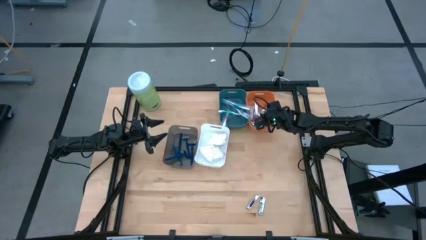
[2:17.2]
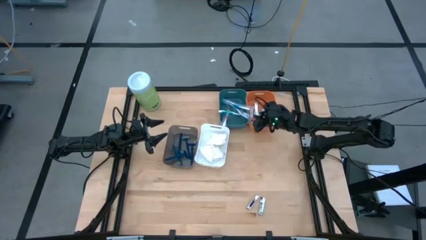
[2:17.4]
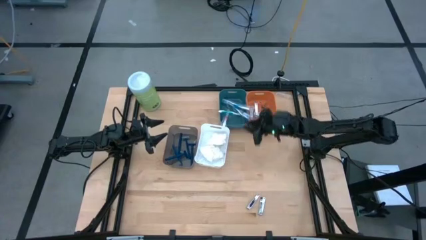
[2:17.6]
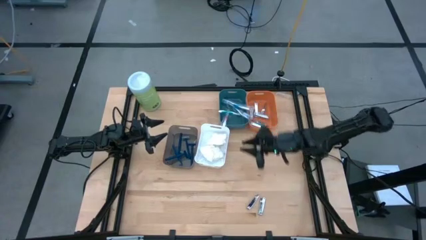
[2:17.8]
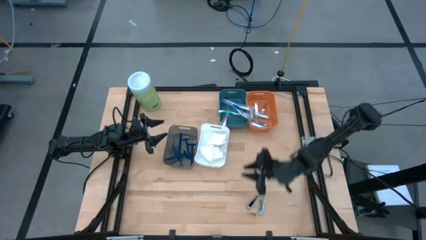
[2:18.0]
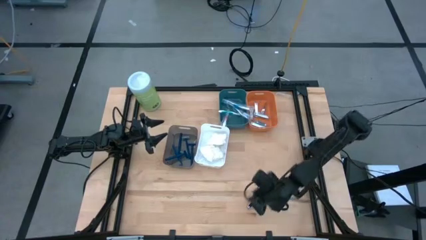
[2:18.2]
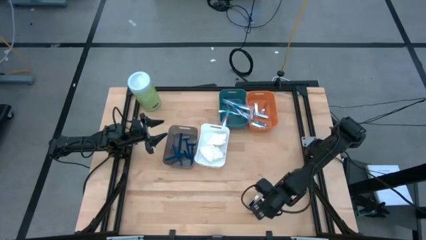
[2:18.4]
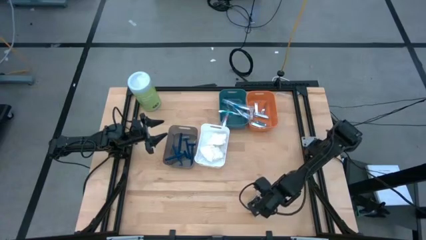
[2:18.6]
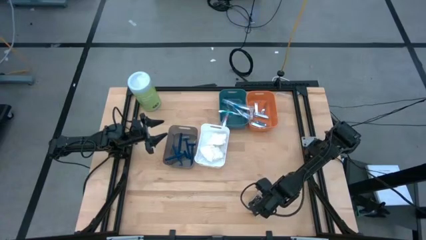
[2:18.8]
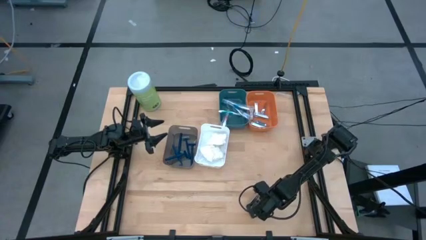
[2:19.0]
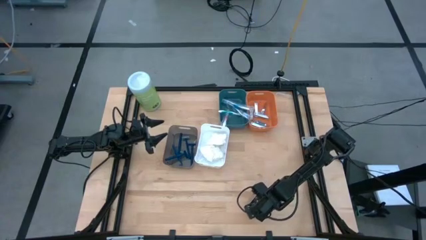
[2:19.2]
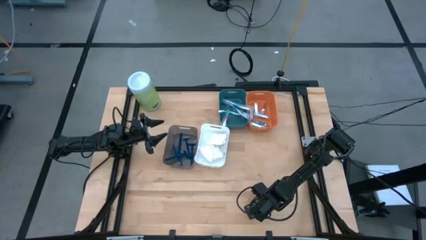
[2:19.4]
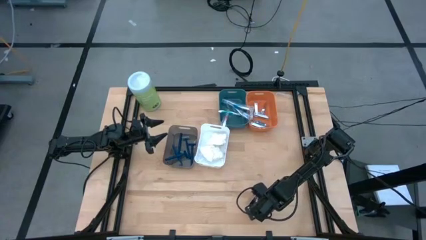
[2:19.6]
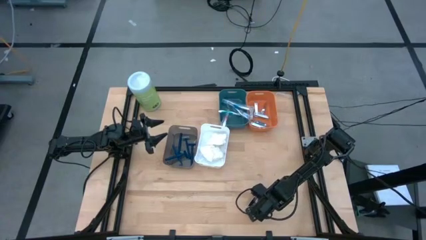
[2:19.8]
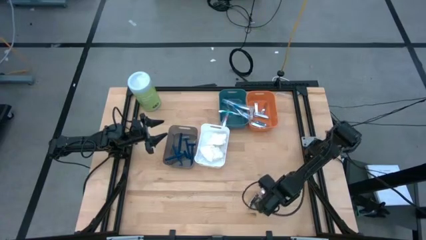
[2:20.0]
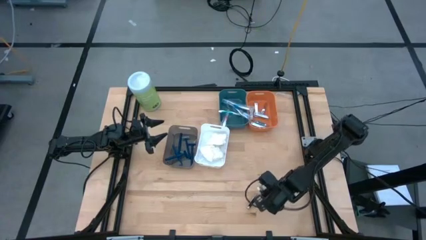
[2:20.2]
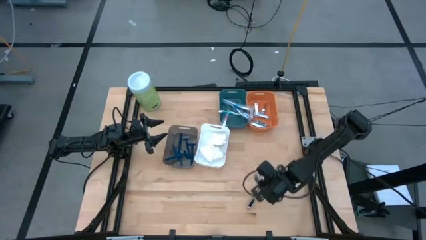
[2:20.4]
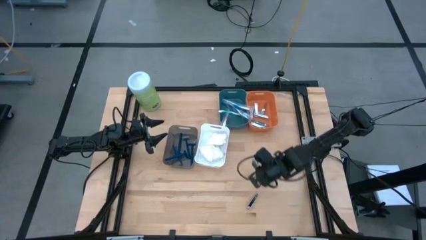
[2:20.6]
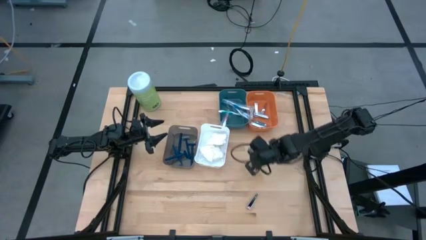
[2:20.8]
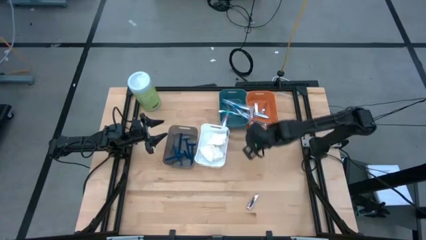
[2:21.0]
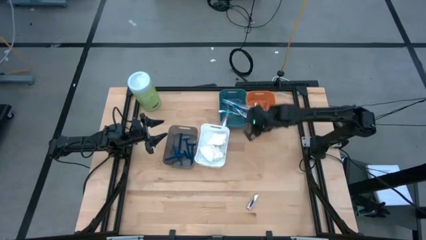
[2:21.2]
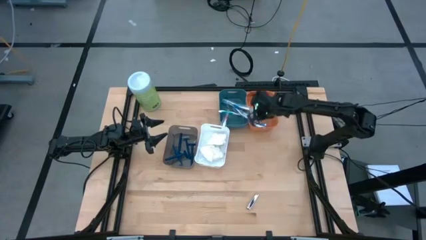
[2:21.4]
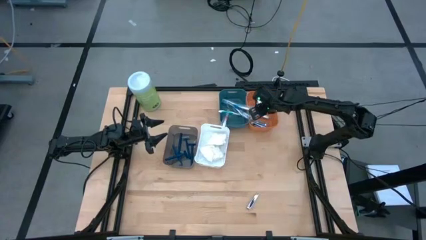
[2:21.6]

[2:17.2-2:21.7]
Task: Pick & Place Travel size toiletries
Put the silver nail cutter into the orange bin

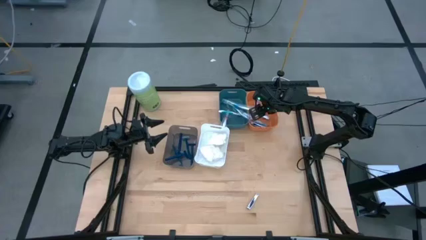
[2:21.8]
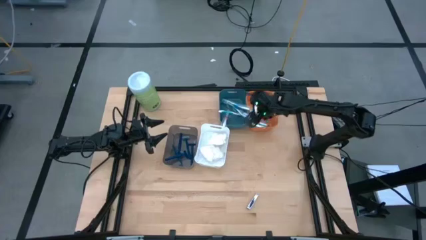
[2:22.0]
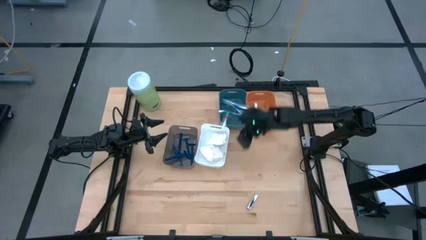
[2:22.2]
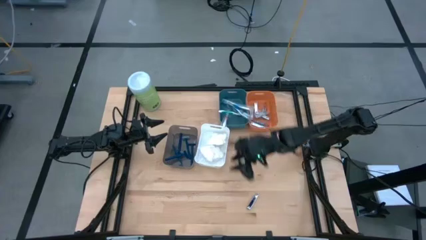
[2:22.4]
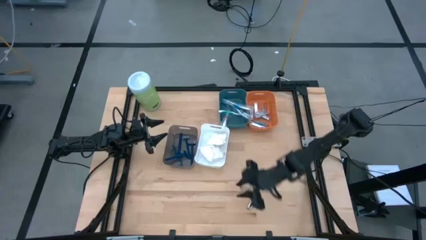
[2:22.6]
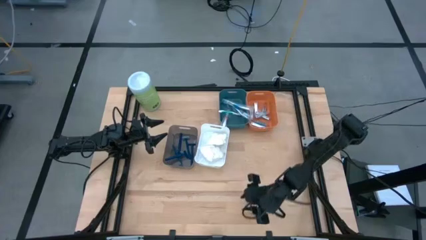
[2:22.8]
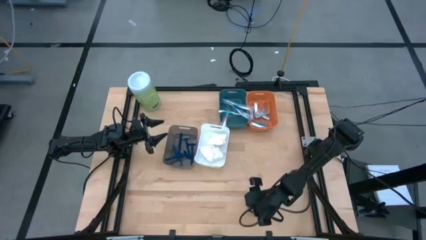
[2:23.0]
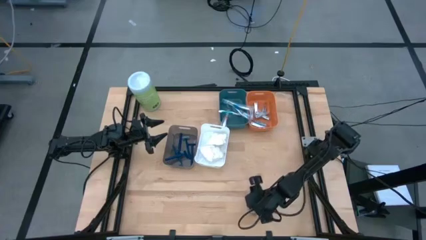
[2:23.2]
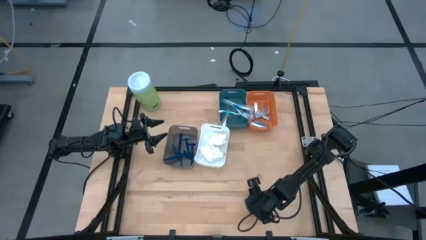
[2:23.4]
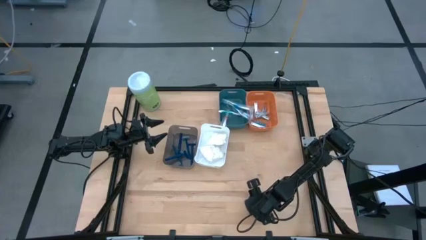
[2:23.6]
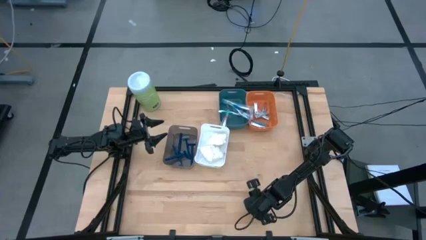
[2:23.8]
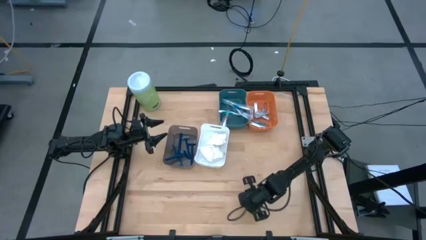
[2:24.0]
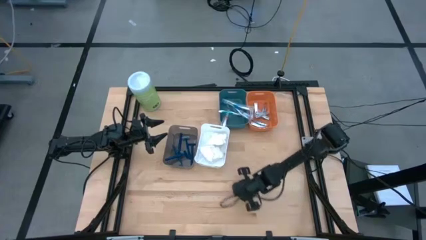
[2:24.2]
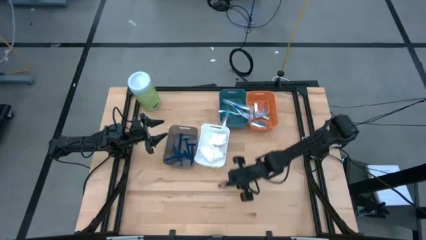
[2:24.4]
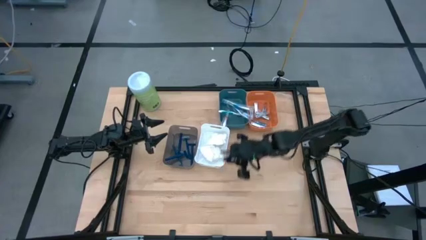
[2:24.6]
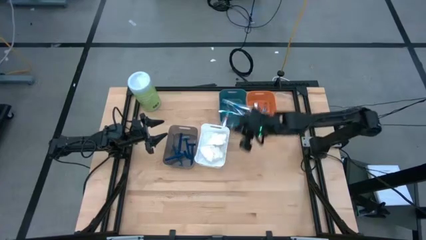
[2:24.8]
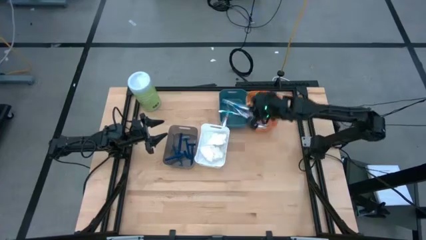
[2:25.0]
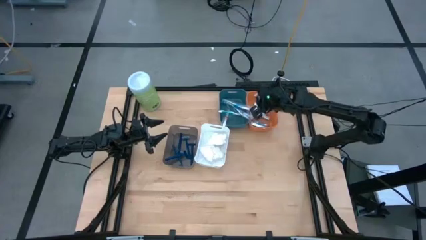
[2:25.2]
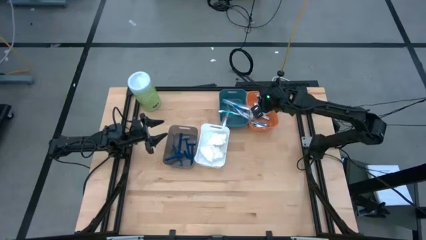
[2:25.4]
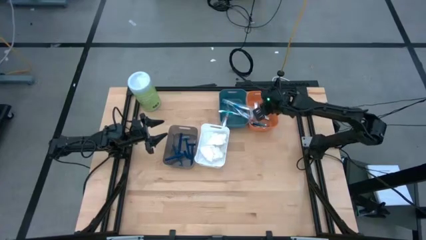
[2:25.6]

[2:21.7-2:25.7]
Put the silver nail cutter into the orange bin

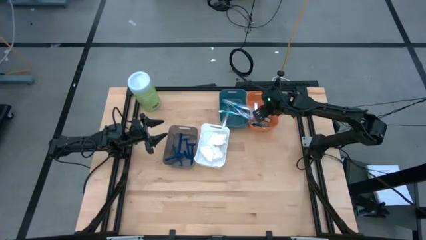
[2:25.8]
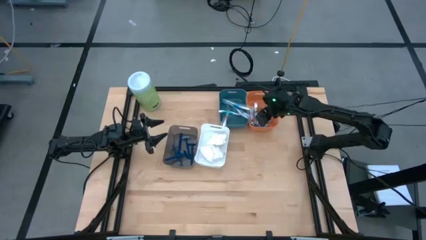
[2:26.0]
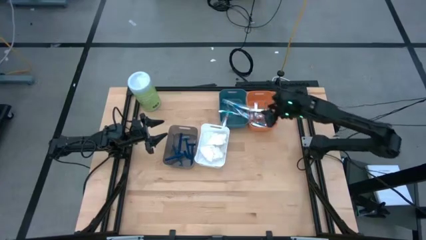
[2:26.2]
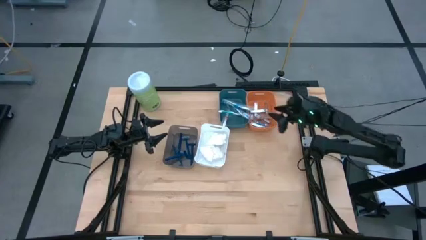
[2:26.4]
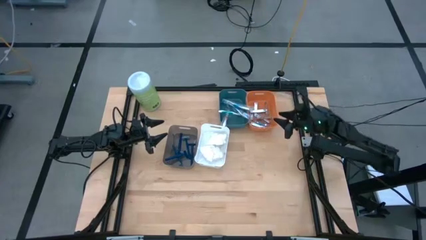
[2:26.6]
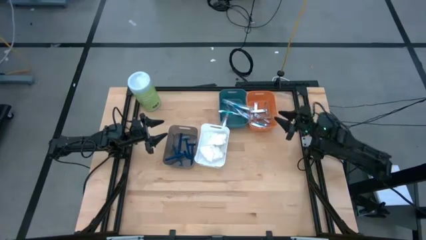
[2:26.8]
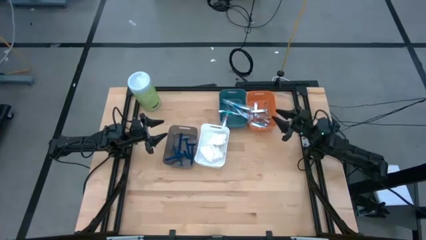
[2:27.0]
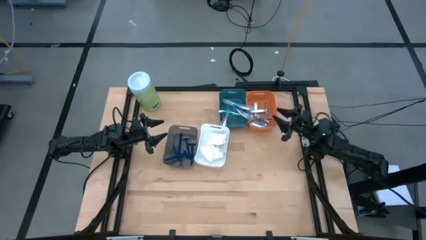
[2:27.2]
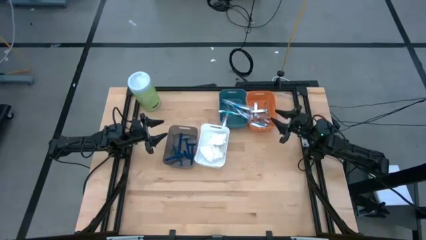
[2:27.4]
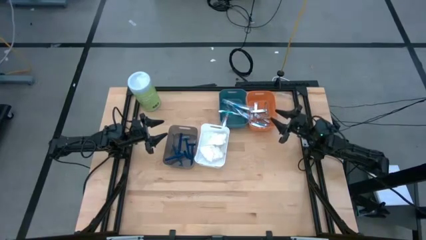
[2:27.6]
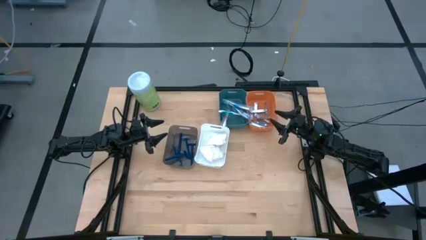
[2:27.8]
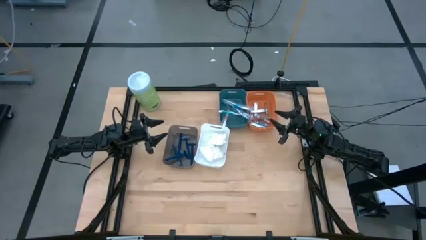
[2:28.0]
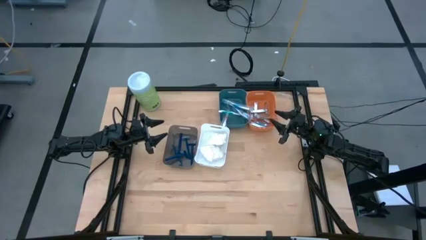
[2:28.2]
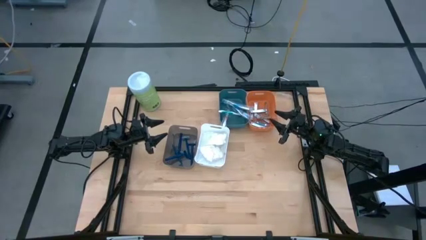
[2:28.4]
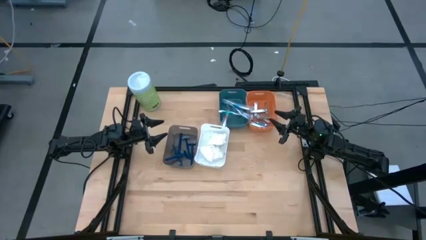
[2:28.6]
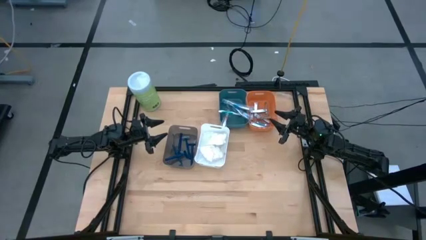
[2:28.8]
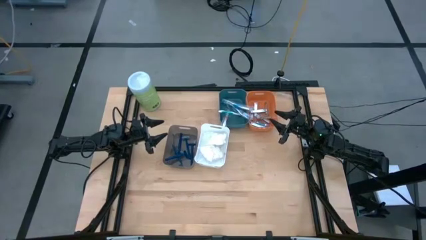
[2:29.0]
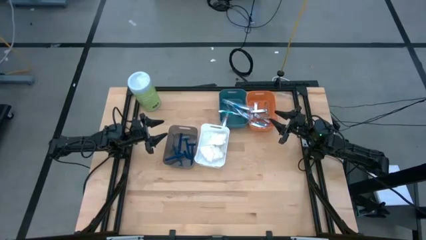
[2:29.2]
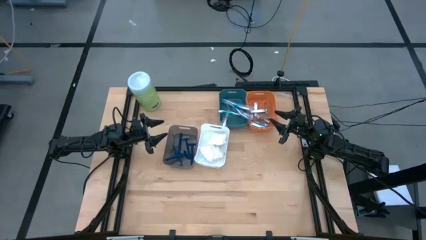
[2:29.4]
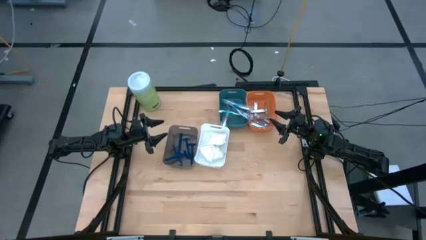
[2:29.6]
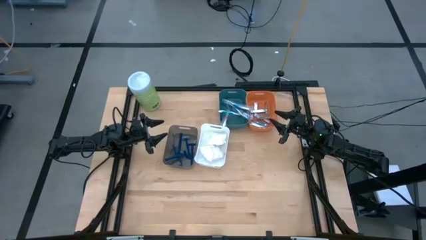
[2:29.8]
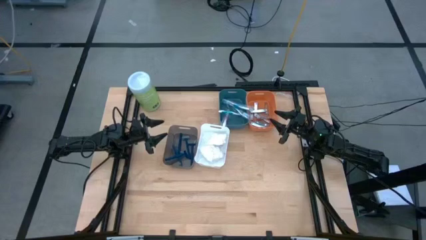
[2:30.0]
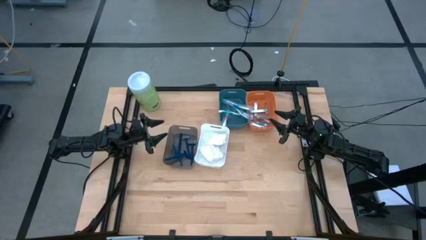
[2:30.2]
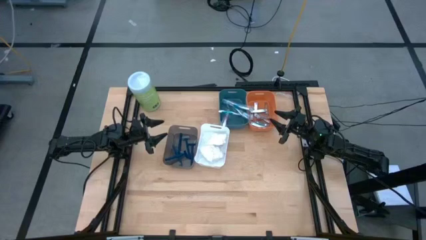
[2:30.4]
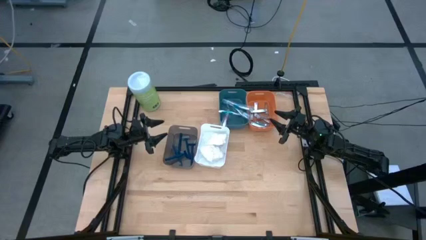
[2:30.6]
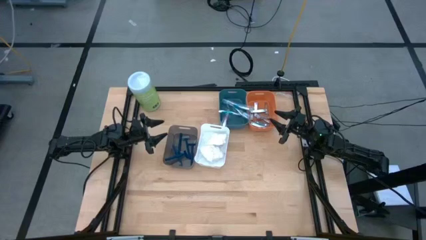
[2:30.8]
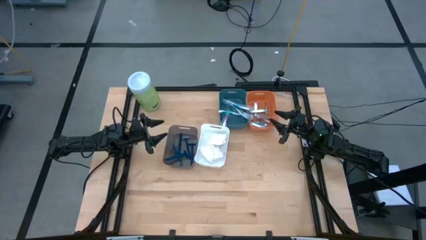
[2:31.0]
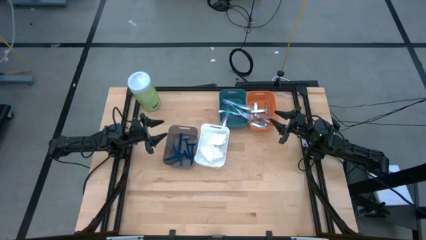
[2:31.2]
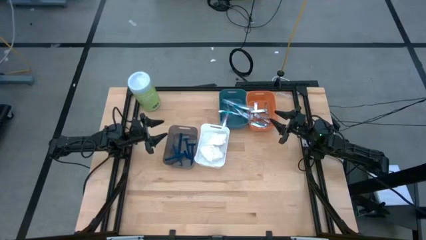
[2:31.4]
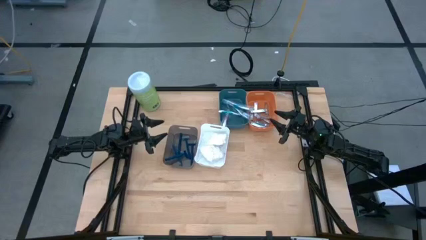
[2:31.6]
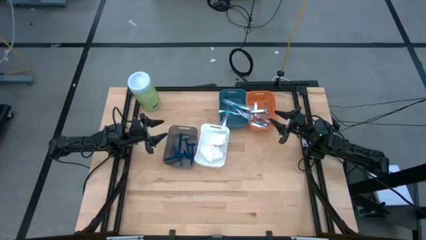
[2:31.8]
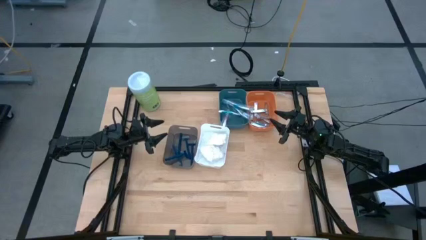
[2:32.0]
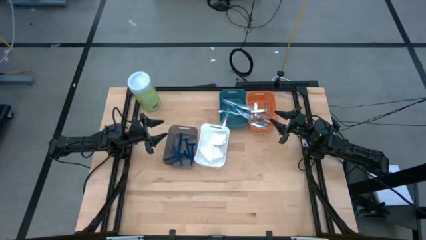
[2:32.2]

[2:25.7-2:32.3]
Return to Home Position
